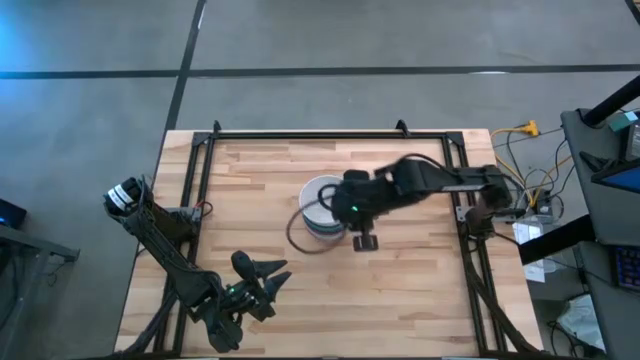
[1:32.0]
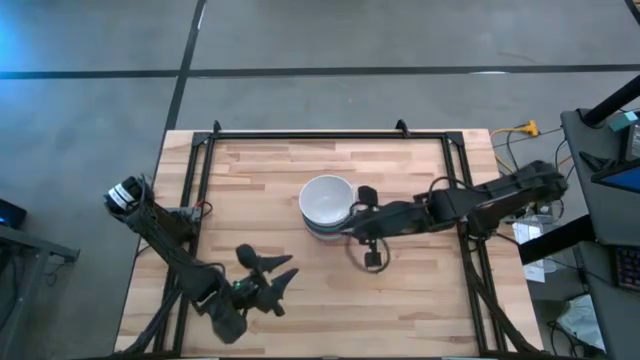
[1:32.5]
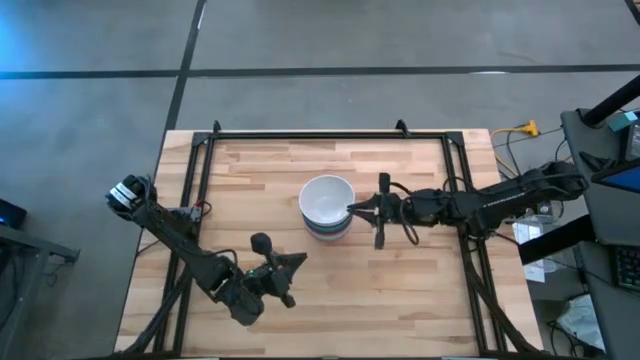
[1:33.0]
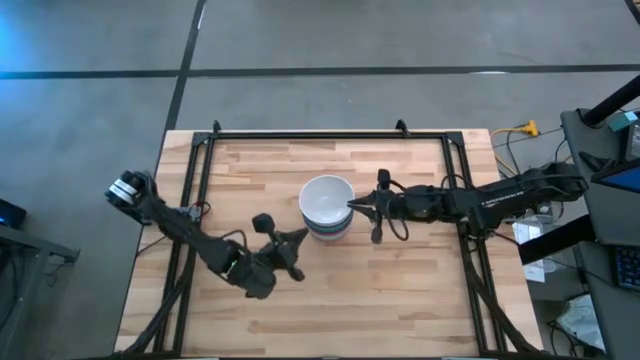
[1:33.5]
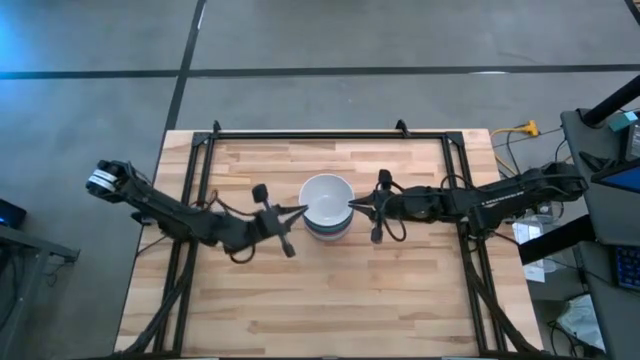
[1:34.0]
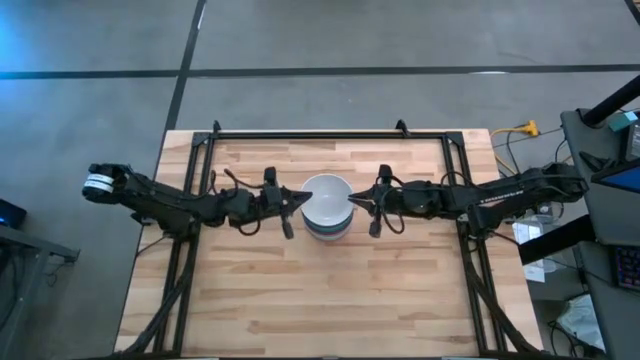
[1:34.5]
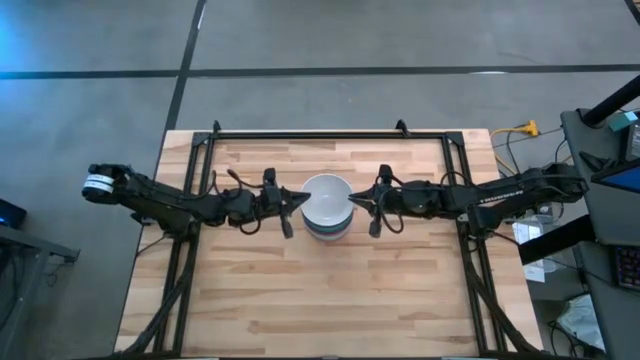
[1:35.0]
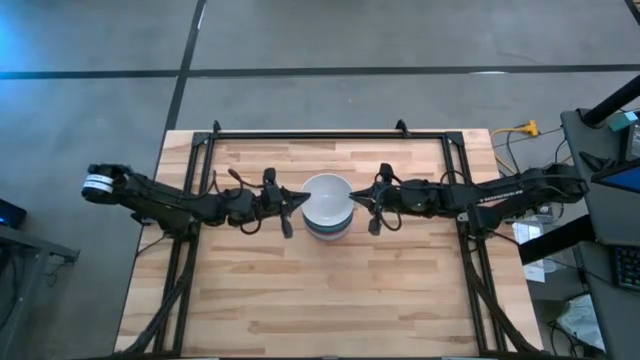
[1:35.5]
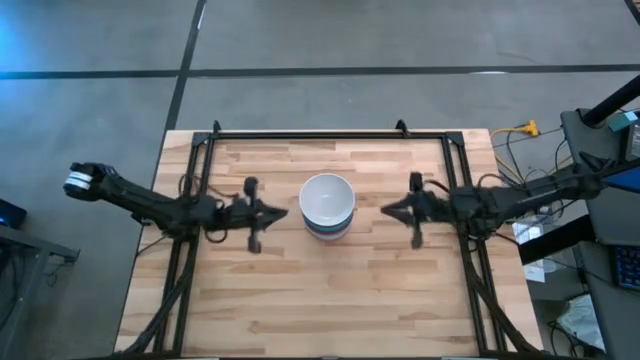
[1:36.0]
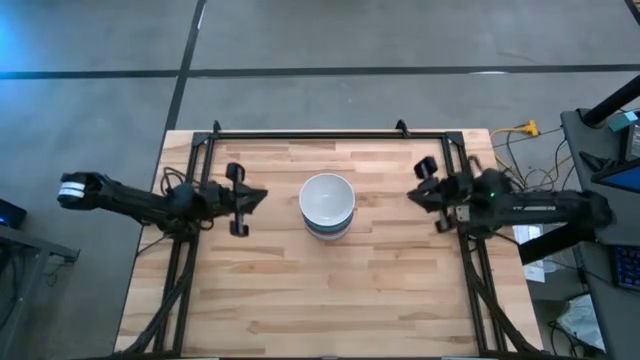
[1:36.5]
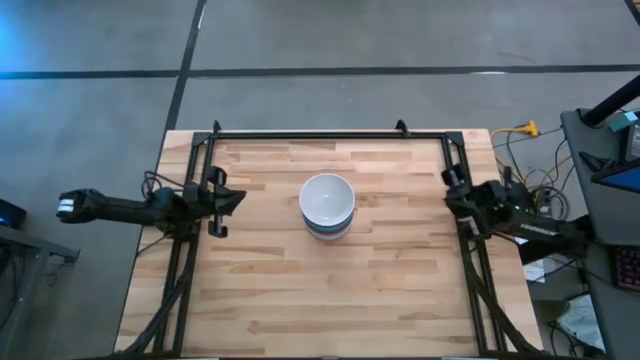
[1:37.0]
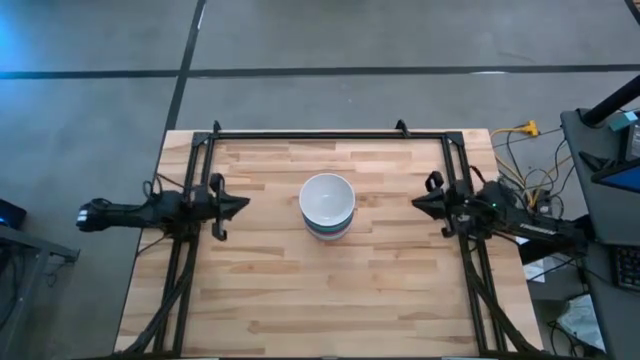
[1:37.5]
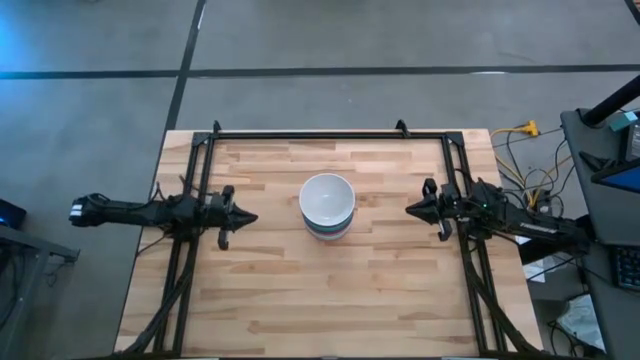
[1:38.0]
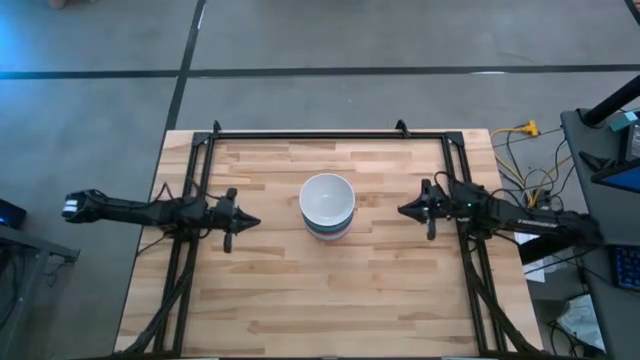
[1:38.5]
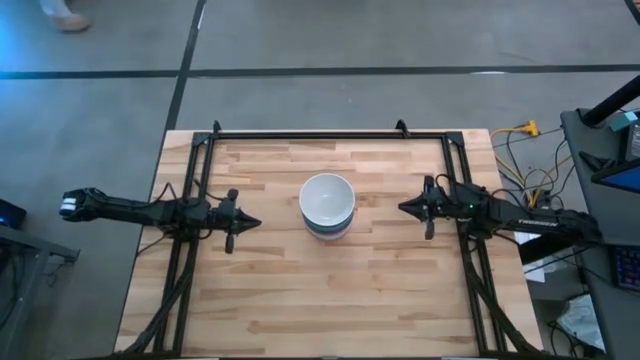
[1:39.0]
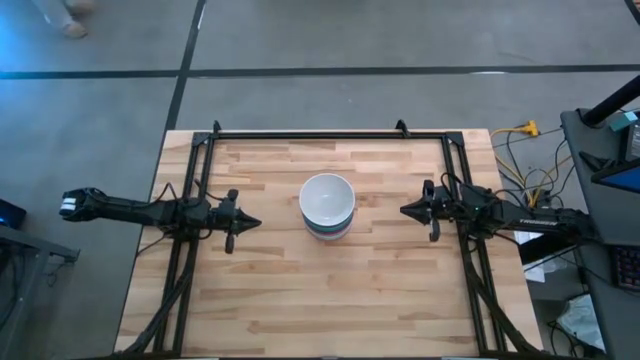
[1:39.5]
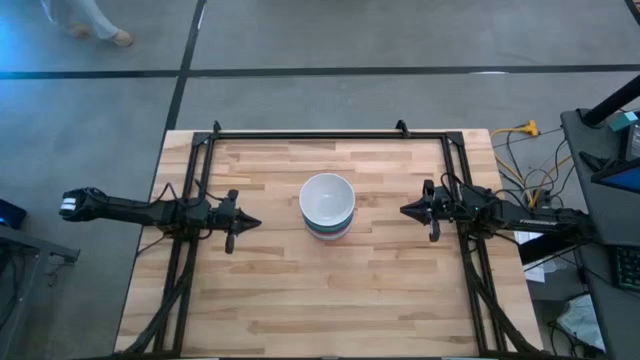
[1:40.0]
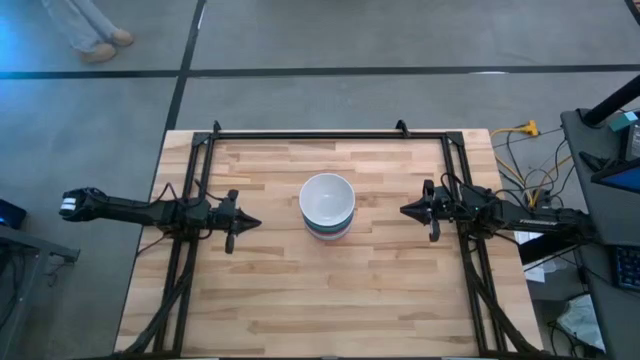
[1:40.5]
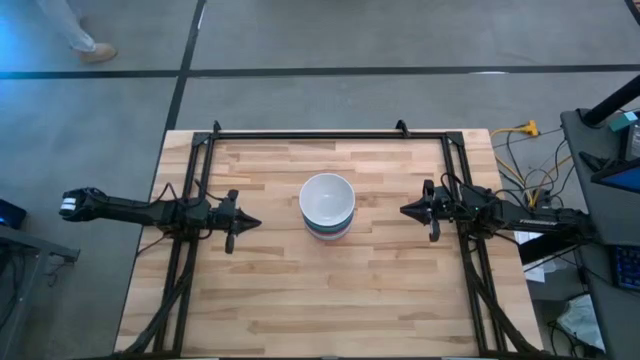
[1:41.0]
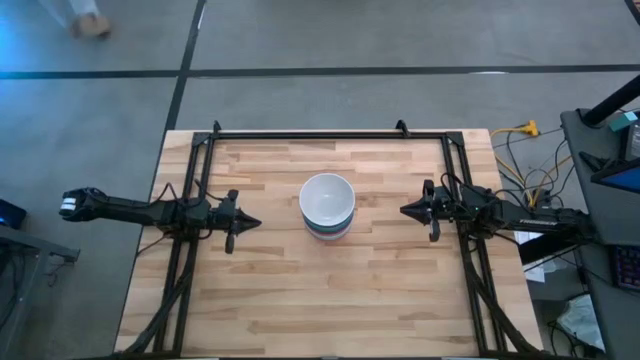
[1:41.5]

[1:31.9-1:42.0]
Task: Nest bowls inside each other
Return to Home Position

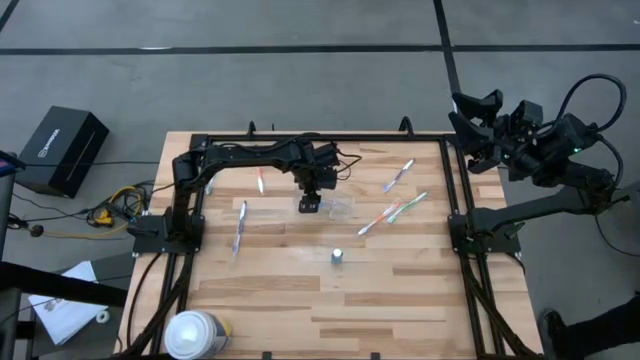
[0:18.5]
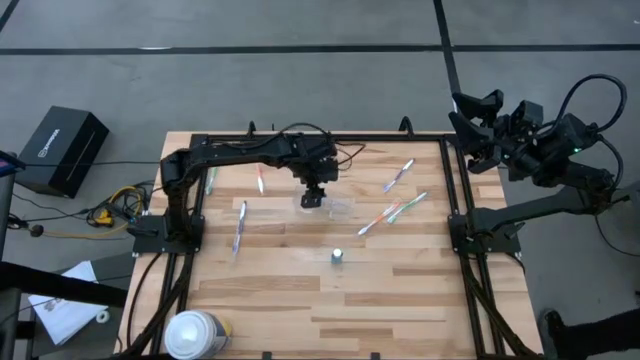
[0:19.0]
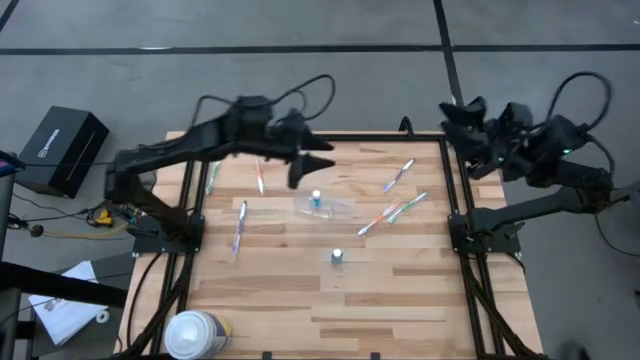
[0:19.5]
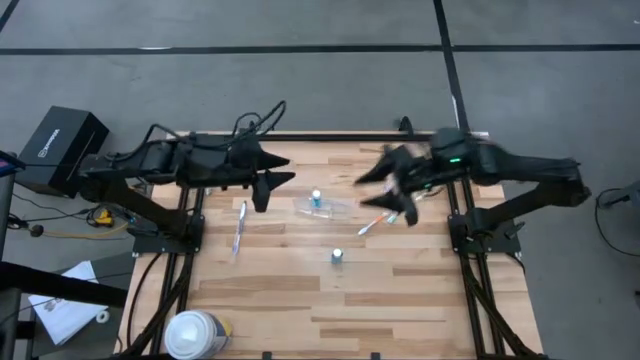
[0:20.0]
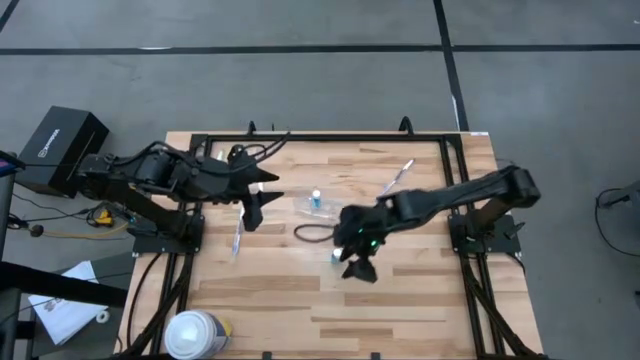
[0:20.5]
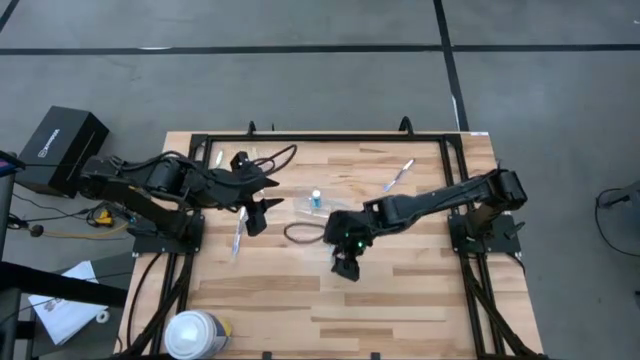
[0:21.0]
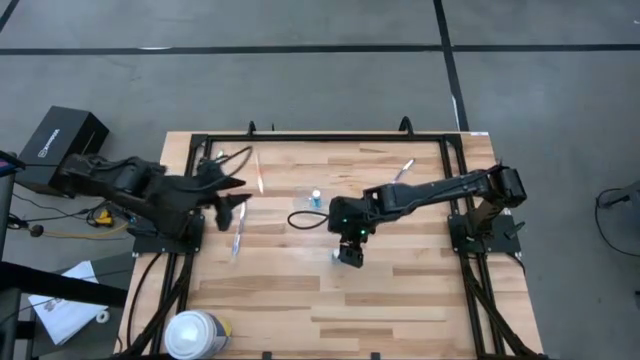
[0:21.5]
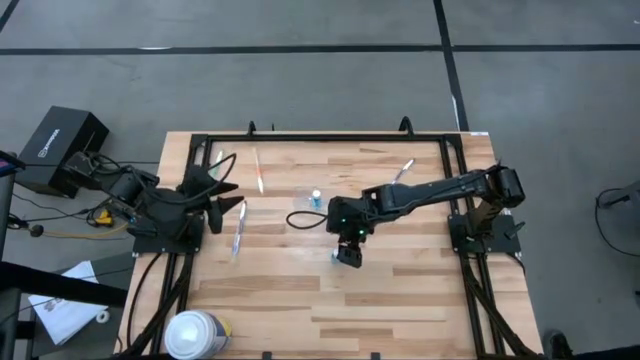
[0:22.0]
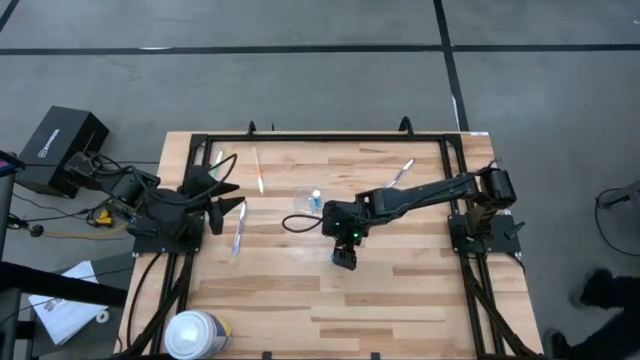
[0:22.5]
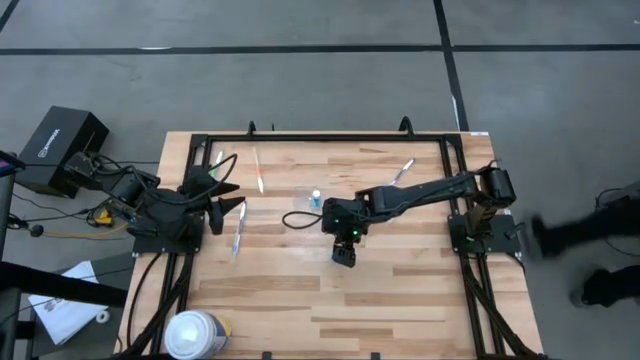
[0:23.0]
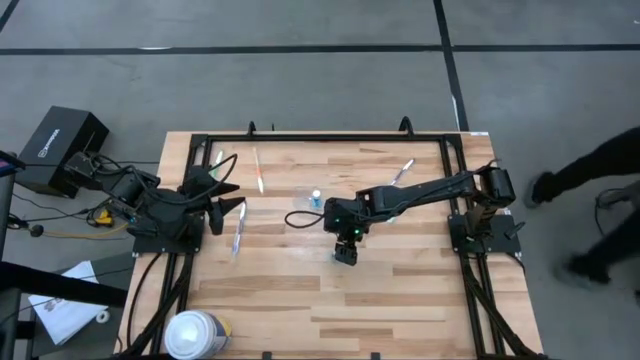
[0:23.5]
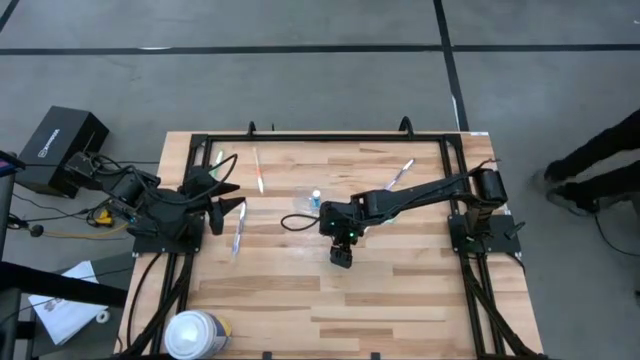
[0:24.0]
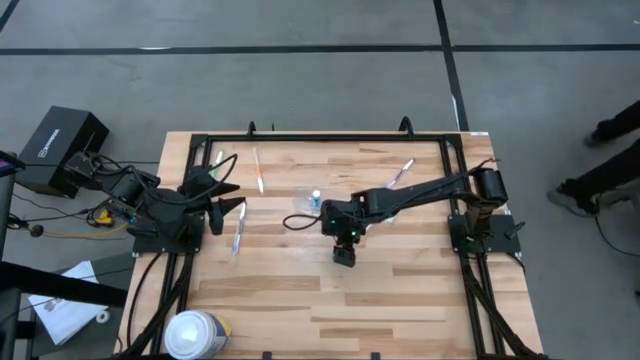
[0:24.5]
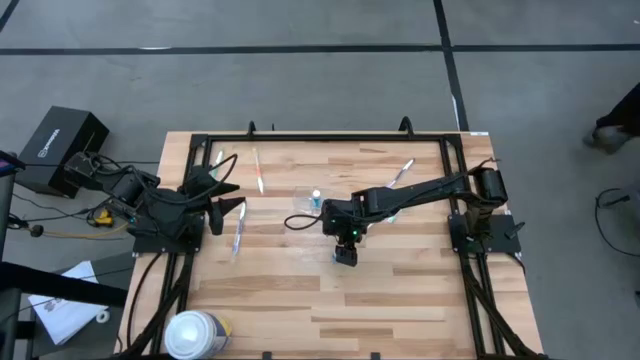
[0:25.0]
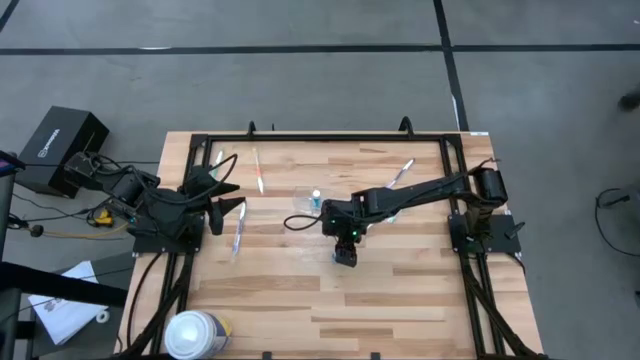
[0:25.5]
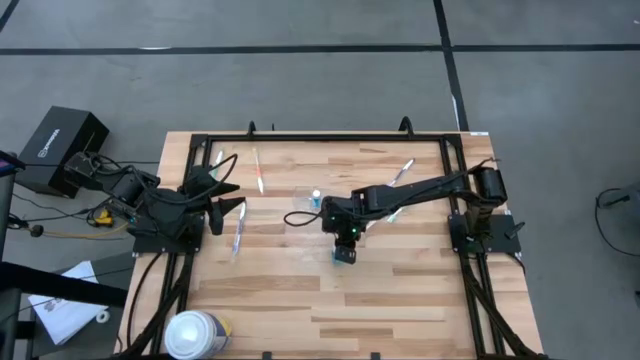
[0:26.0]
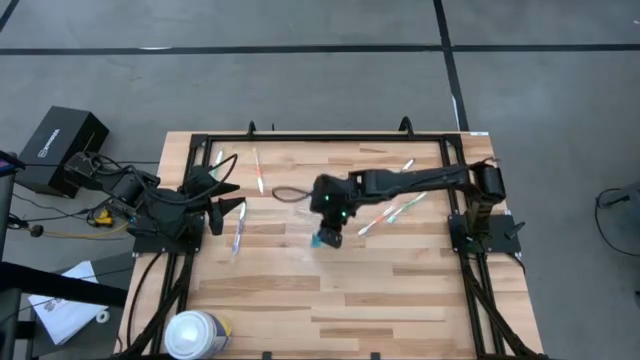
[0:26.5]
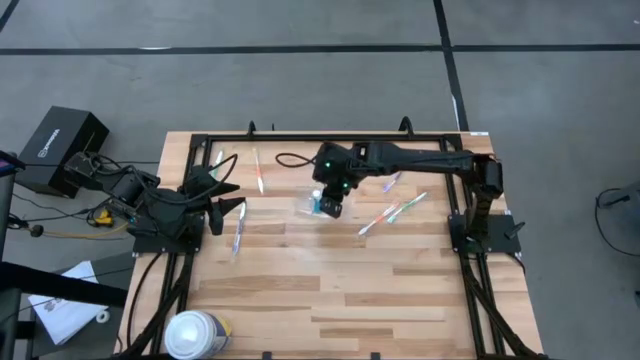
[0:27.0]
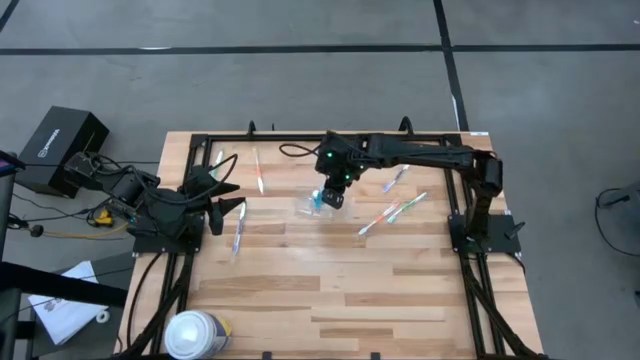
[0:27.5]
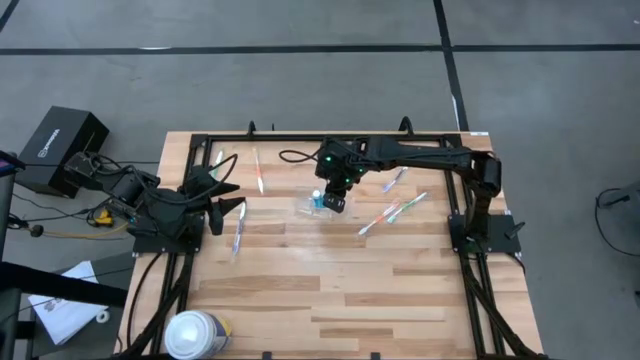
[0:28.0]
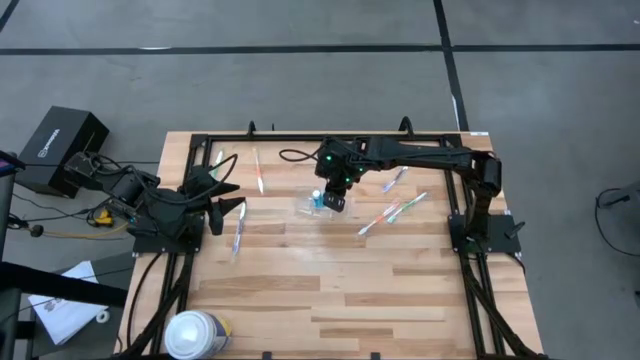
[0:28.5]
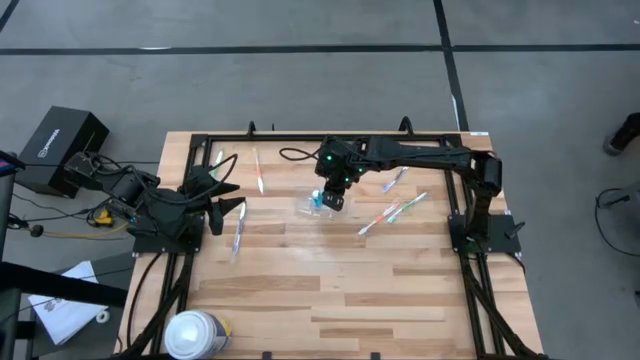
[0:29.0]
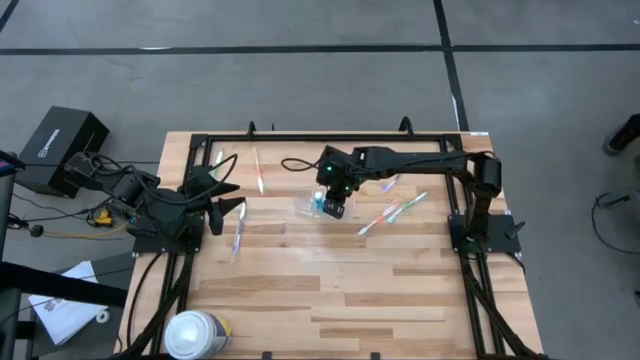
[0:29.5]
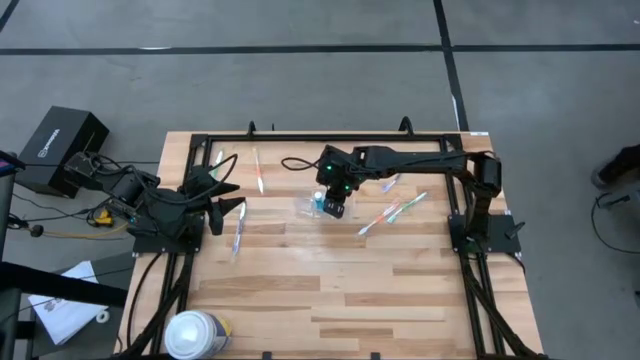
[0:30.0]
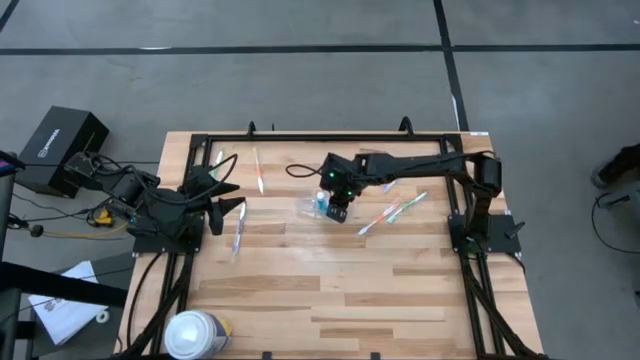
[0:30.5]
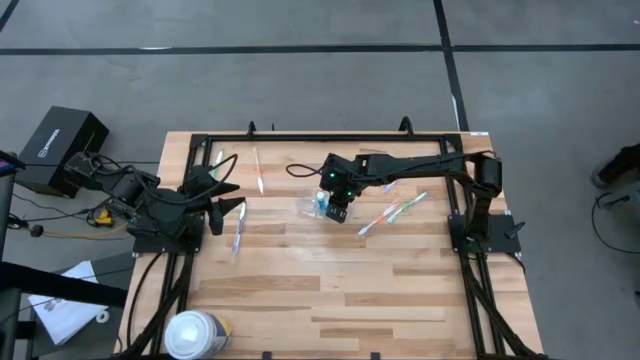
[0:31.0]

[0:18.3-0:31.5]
Task: Pick & Place toothbrushing station
Put the blue mouthwash into the transparent organizer
